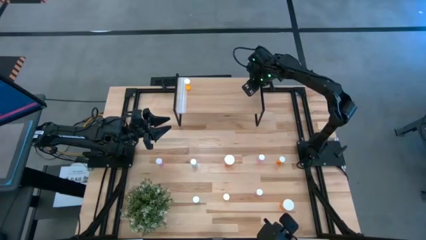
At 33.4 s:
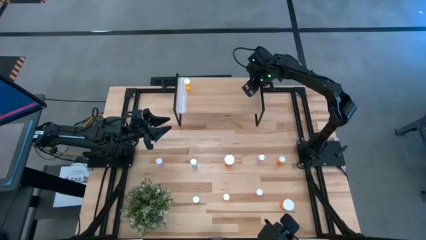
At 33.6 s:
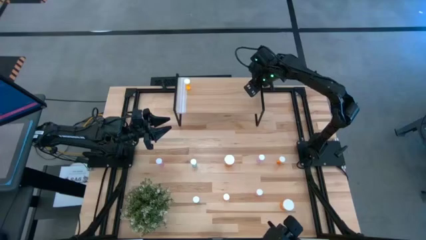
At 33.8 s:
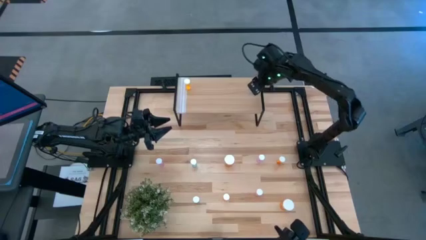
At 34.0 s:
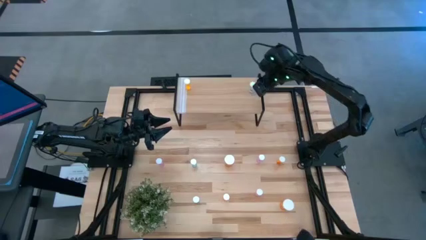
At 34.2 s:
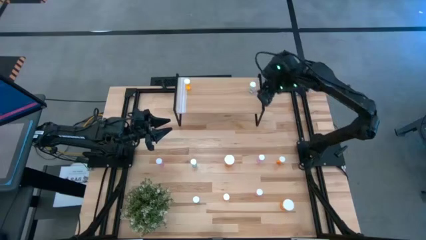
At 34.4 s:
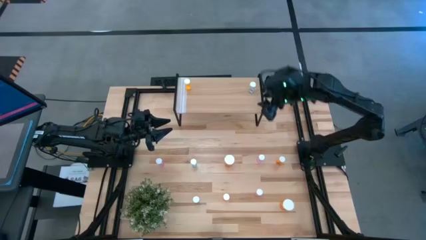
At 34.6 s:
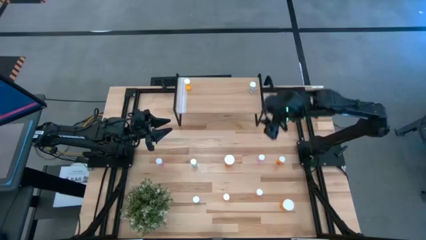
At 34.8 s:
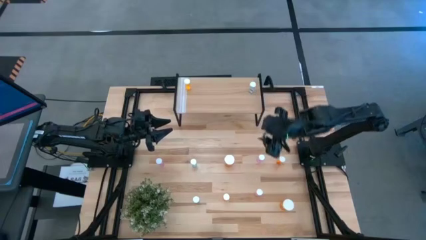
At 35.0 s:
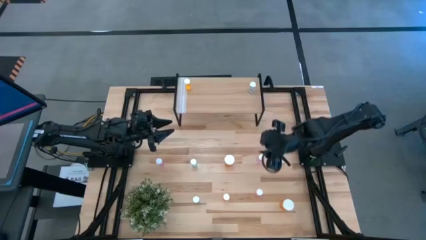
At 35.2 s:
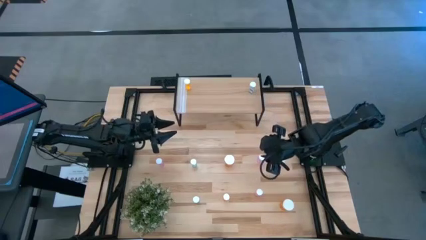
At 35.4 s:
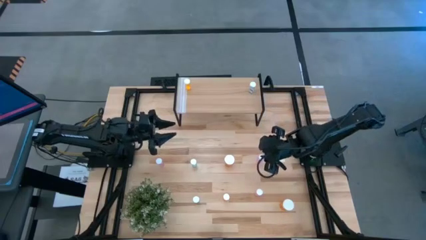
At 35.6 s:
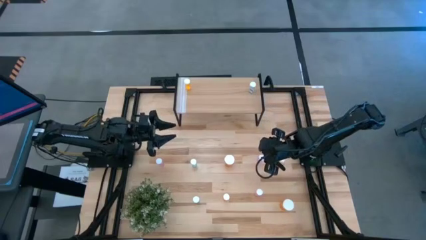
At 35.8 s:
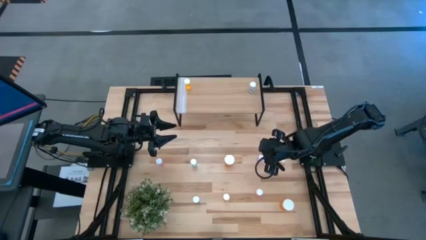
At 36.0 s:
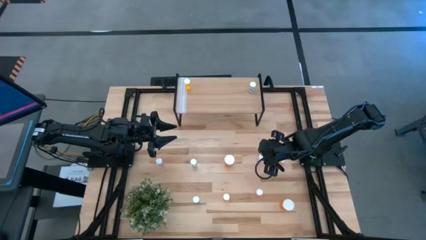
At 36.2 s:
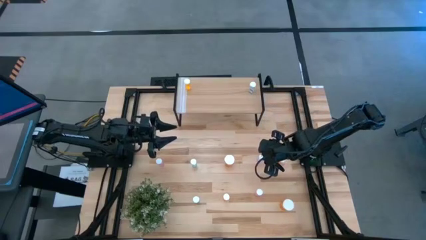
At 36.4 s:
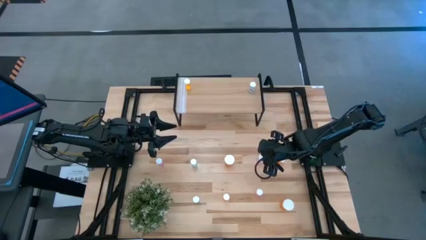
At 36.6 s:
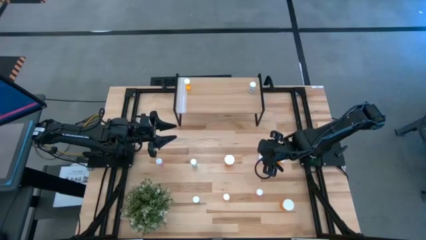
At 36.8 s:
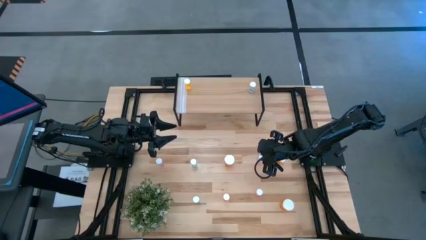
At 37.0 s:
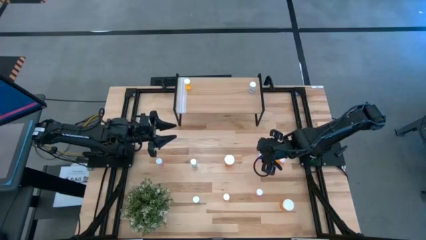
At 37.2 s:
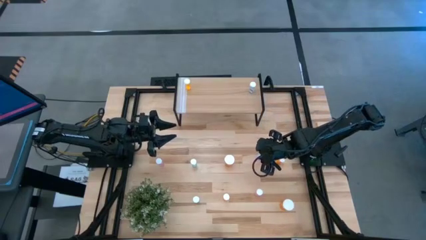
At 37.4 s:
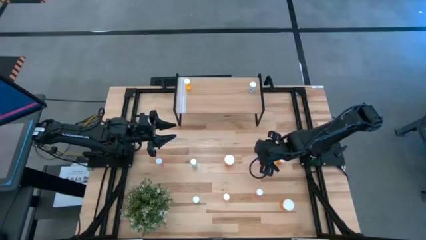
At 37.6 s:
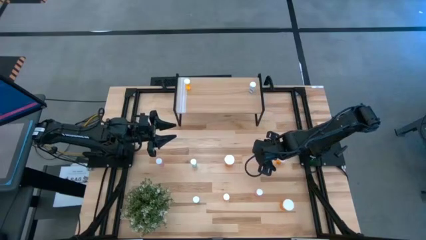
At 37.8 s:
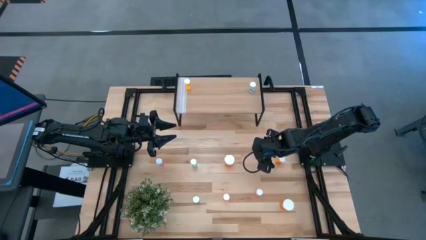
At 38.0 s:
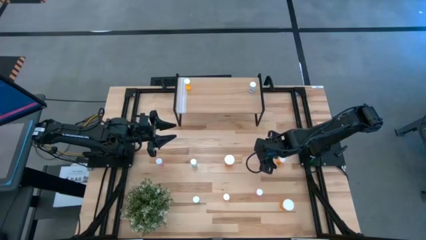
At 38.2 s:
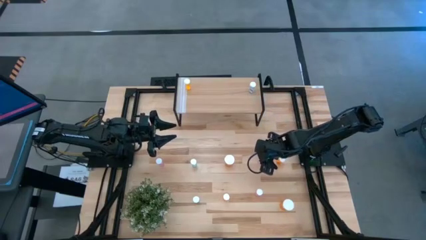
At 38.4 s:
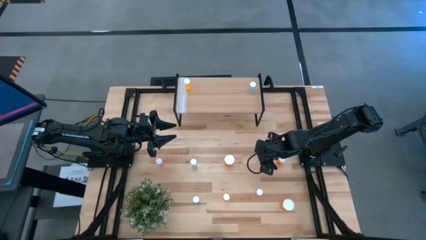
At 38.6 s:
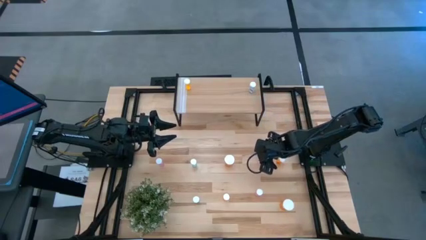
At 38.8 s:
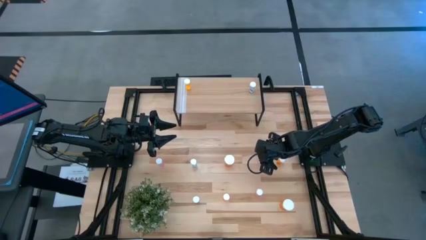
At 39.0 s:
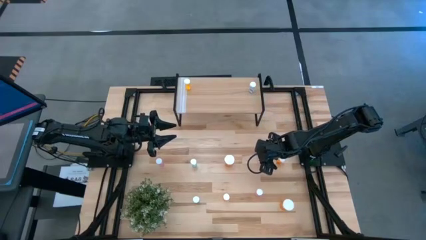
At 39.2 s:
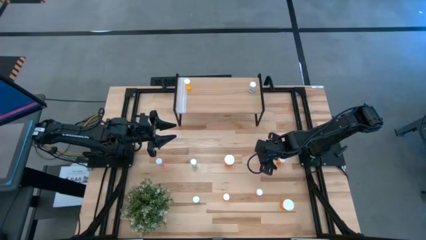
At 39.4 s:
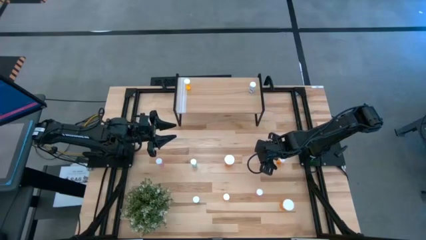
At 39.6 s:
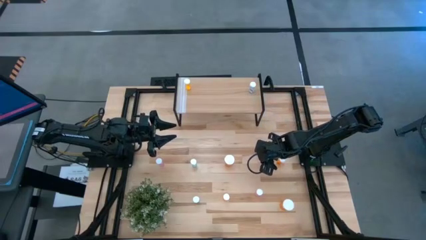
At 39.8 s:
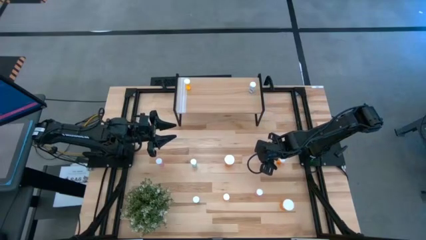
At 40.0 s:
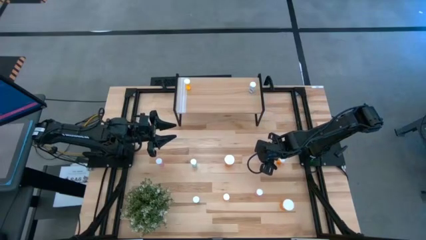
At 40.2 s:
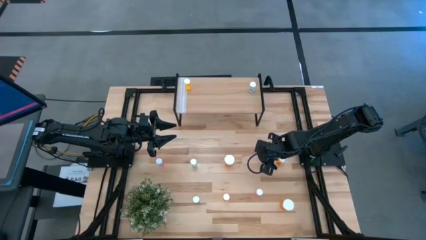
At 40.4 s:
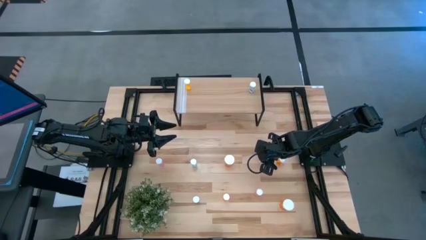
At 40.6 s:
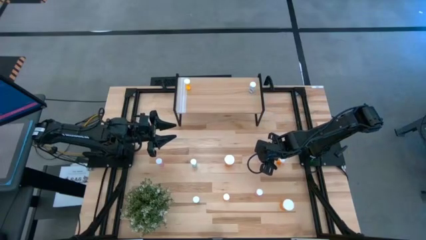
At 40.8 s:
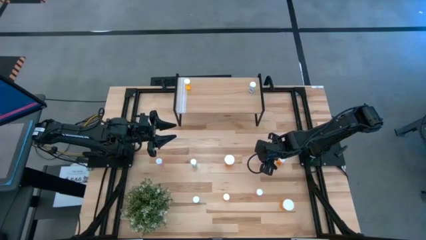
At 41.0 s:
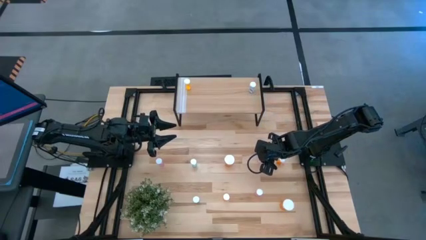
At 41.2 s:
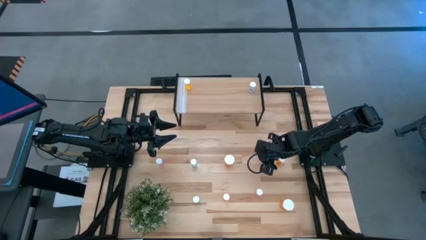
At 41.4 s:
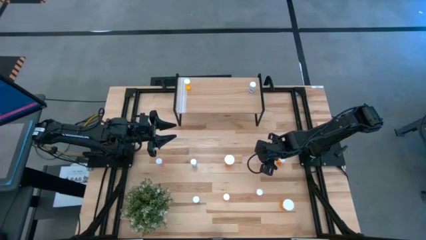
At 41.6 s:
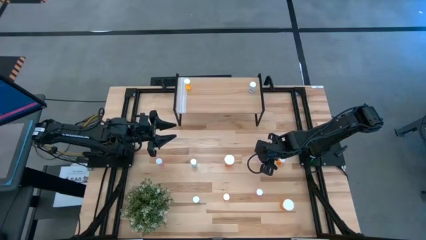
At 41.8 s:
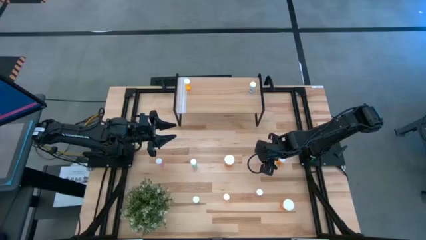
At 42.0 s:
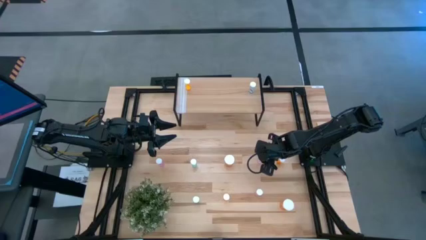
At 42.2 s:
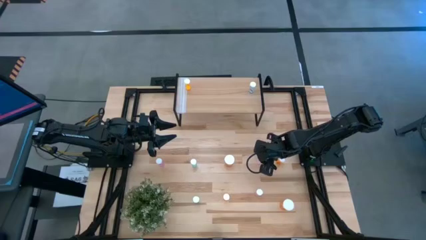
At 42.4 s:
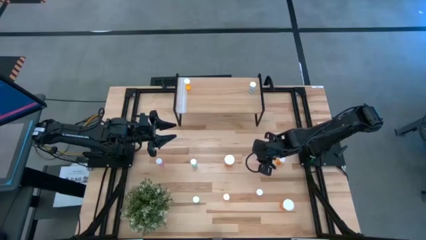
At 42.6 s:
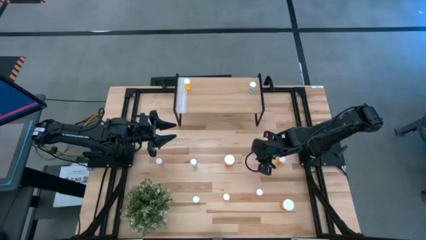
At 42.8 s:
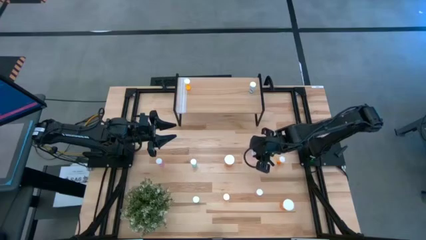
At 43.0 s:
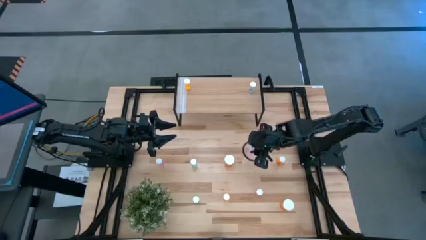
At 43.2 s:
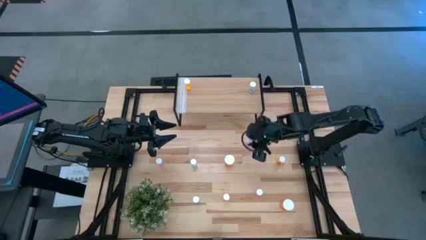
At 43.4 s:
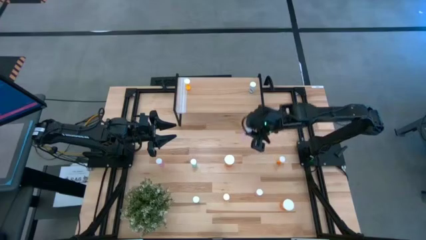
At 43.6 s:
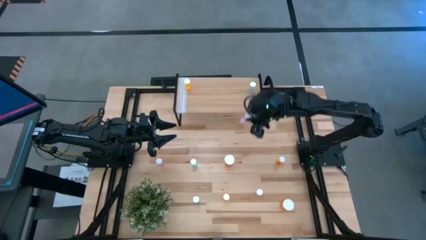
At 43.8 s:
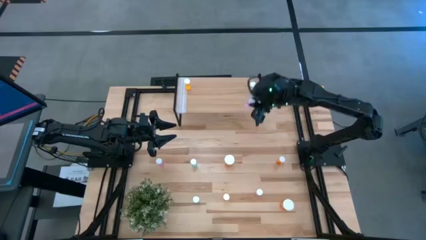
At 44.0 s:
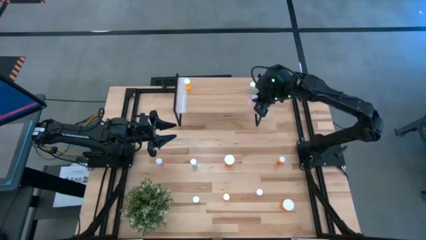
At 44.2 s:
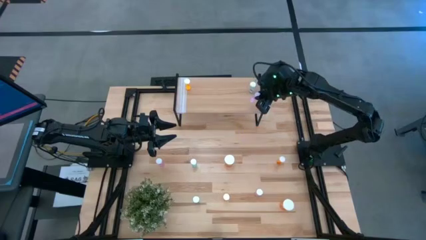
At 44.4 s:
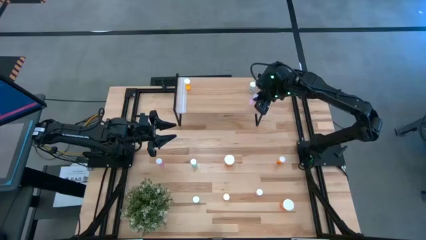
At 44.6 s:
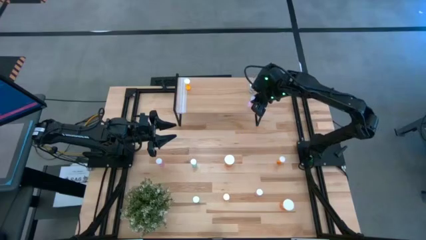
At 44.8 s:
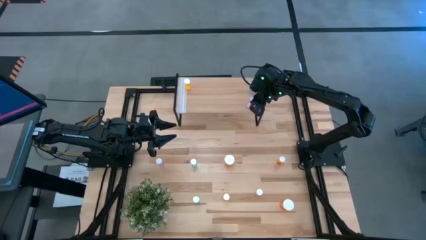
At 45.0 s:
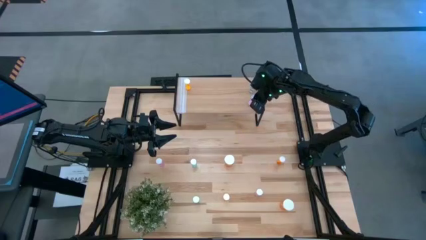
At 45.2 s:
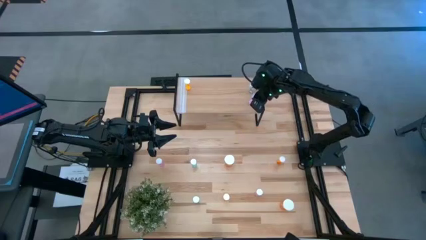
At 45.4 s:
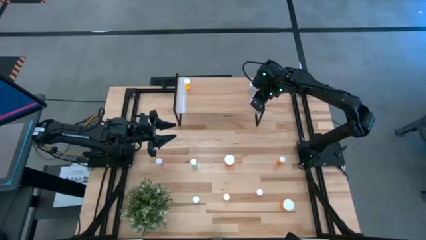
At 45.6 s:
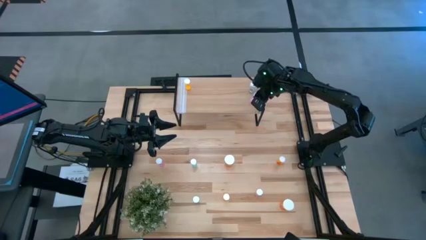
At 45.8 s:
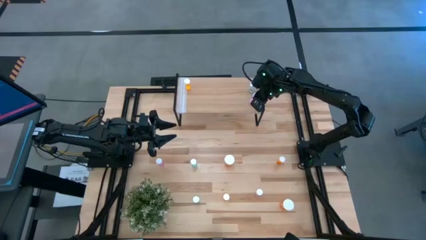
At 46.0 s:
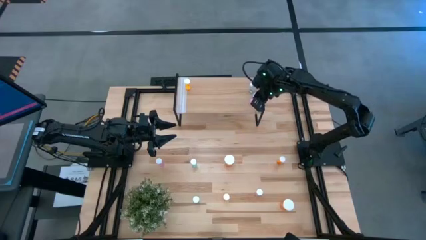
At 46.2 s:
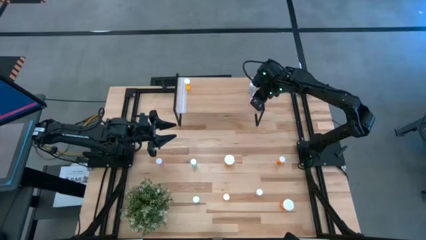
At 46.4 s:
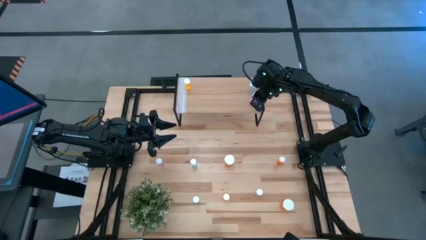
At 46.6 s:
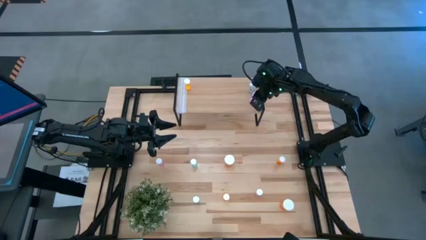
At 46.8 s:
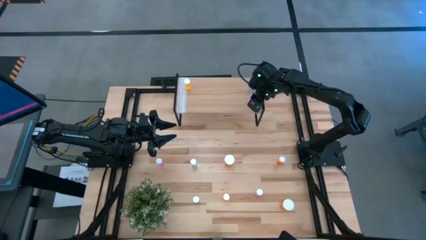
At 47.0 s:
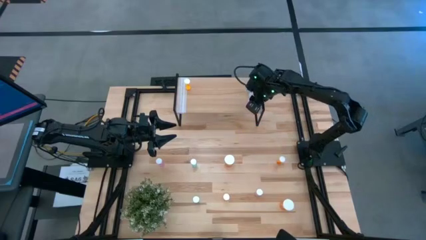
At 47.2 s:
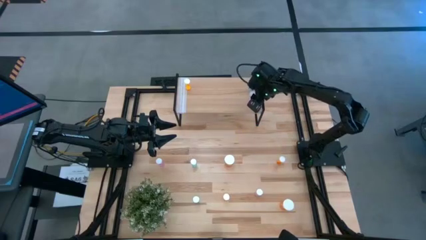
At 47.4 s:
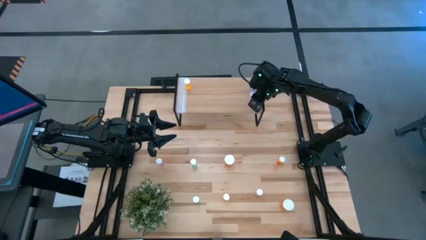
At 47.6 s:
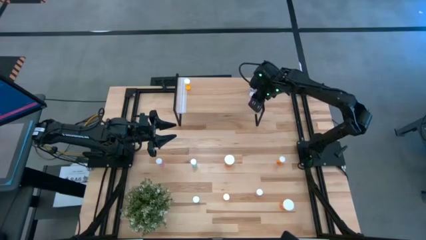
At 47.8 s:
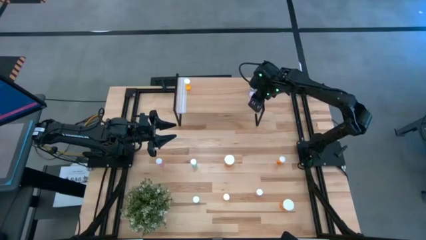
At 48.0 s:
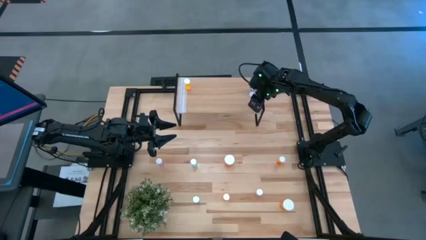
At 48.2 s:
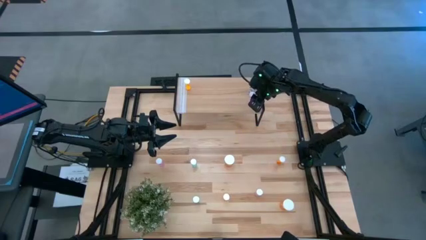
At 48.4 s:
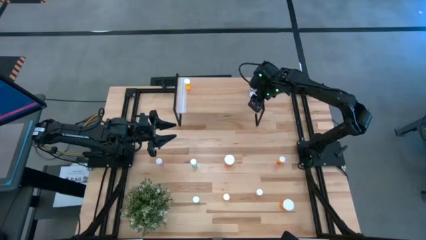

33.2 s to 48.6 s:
Task: Pick and place medicine bottles onto shelf by color
Put the pink pill bottle on the shelf
